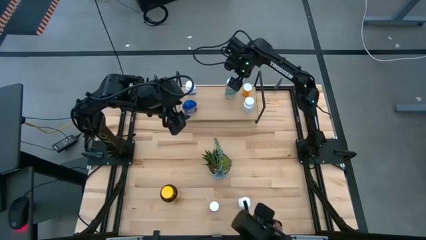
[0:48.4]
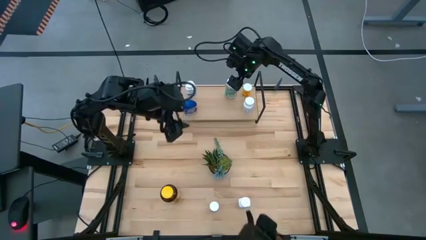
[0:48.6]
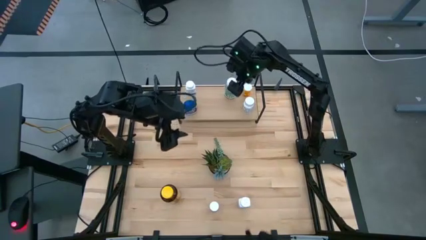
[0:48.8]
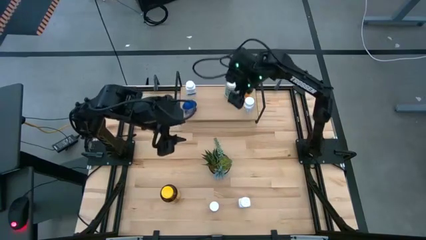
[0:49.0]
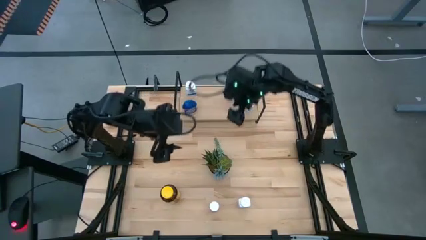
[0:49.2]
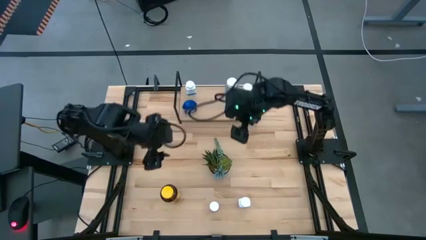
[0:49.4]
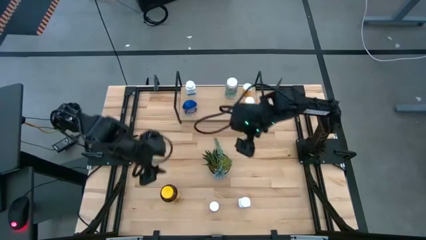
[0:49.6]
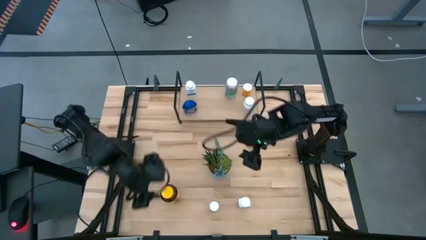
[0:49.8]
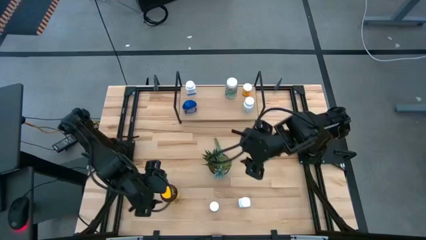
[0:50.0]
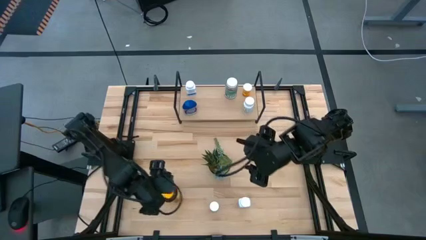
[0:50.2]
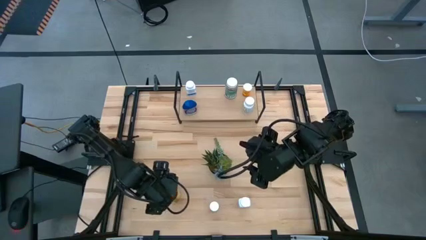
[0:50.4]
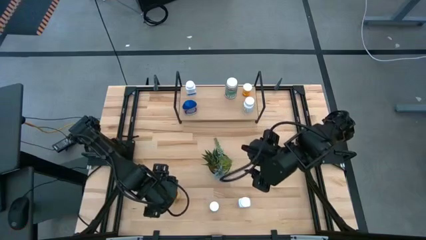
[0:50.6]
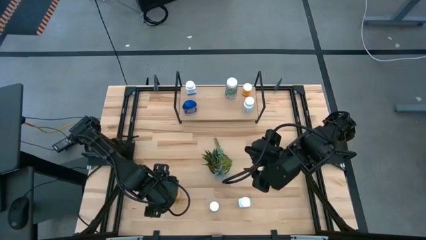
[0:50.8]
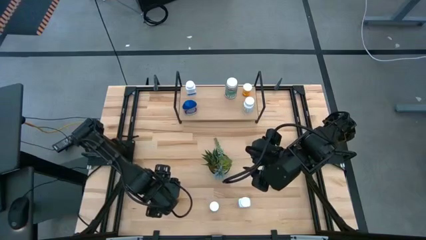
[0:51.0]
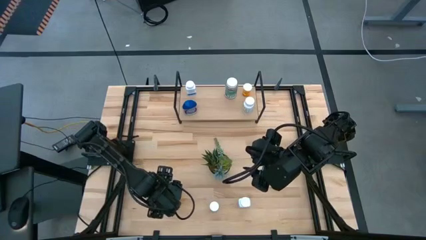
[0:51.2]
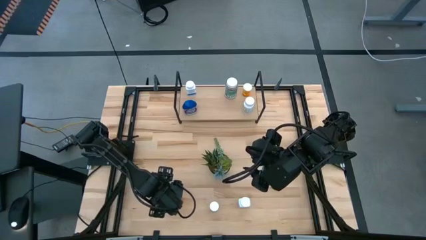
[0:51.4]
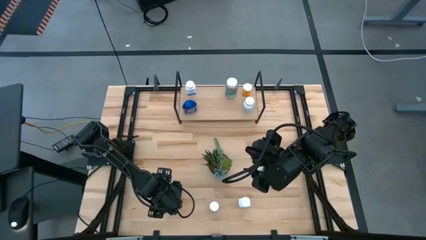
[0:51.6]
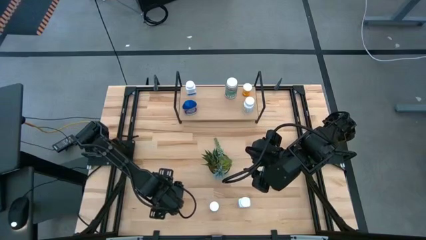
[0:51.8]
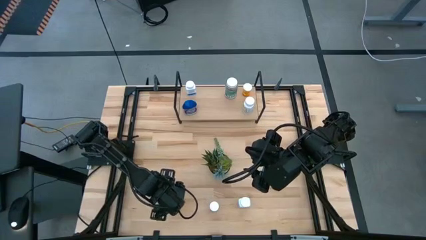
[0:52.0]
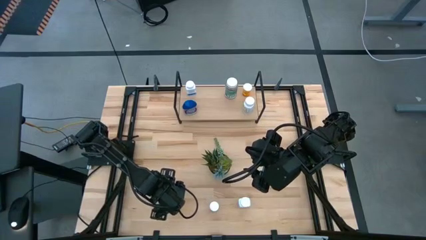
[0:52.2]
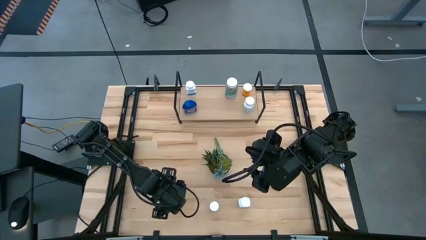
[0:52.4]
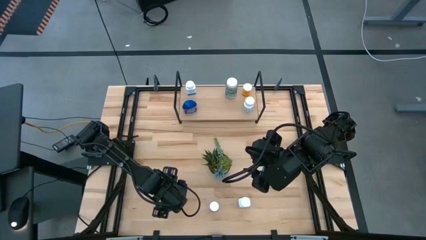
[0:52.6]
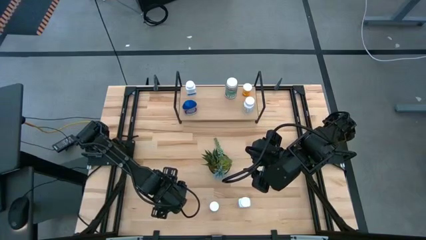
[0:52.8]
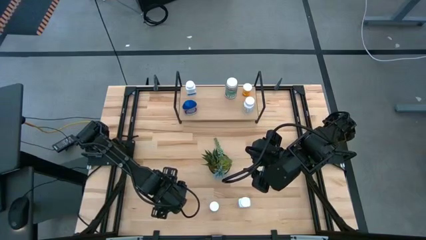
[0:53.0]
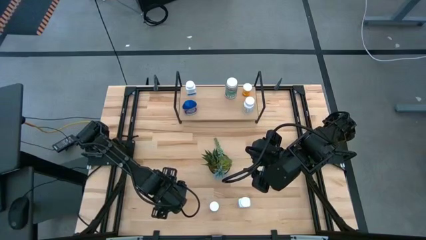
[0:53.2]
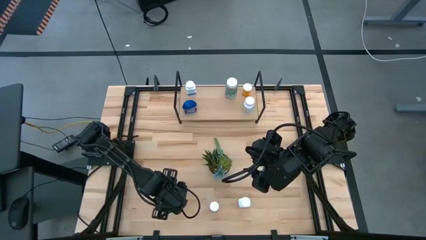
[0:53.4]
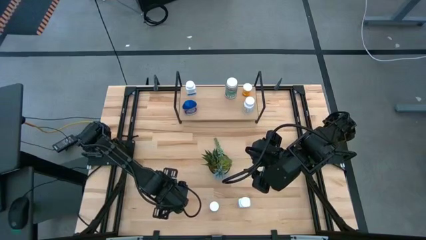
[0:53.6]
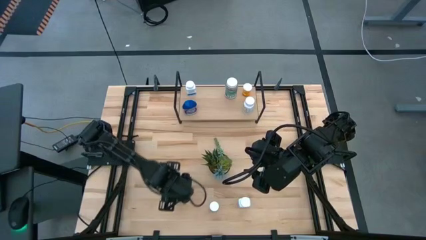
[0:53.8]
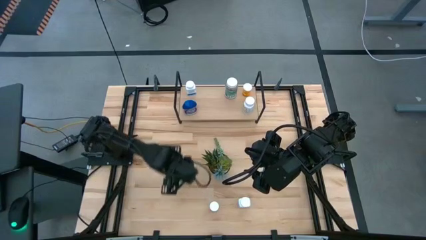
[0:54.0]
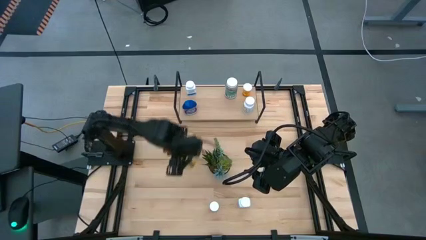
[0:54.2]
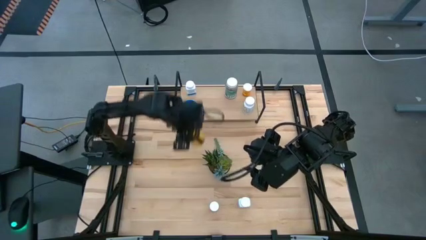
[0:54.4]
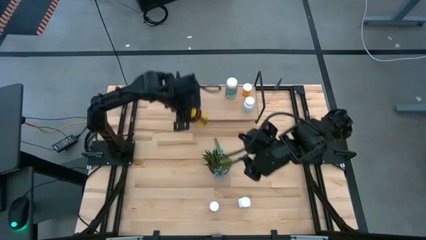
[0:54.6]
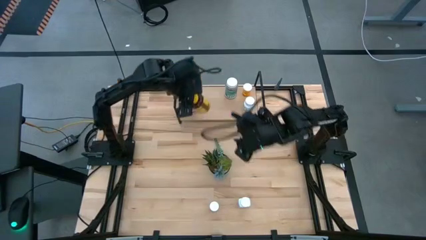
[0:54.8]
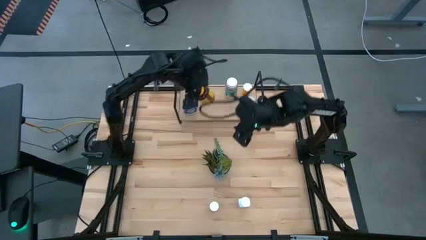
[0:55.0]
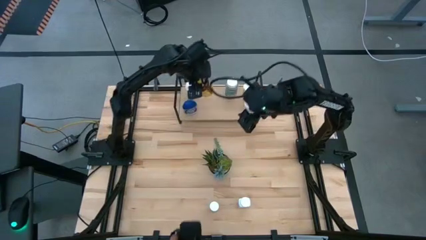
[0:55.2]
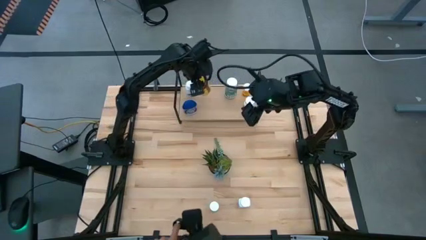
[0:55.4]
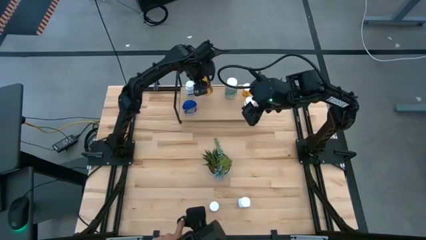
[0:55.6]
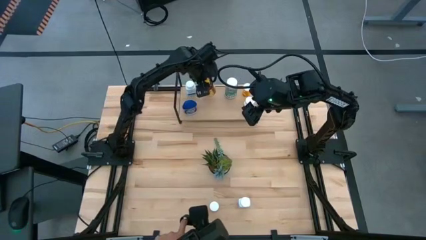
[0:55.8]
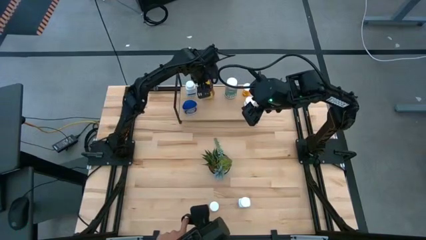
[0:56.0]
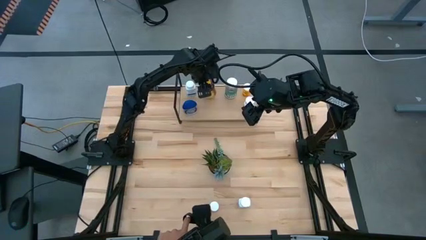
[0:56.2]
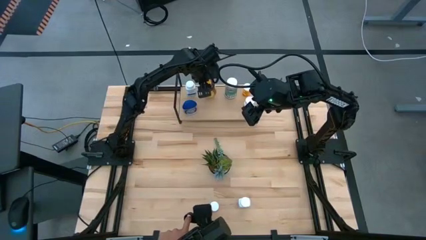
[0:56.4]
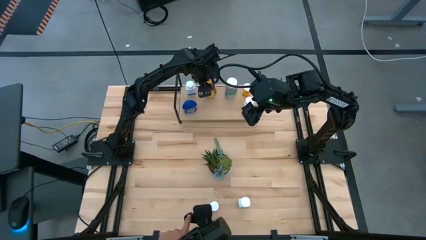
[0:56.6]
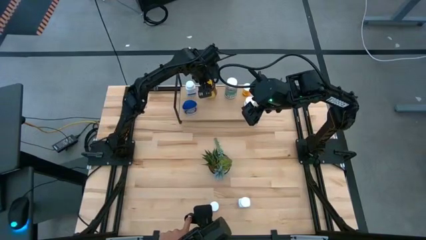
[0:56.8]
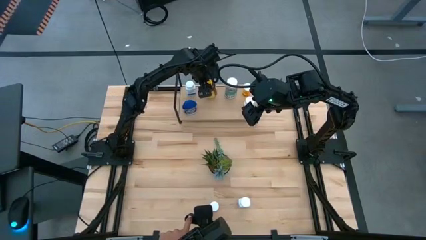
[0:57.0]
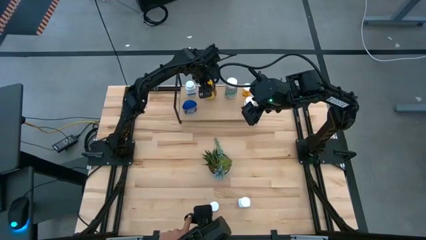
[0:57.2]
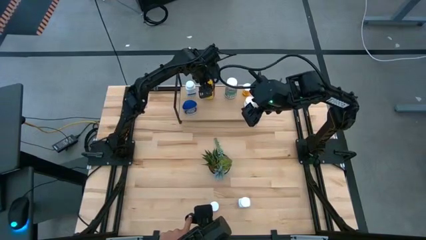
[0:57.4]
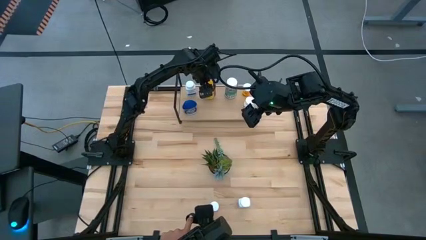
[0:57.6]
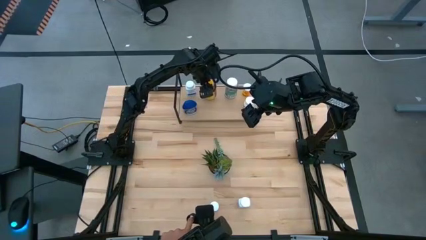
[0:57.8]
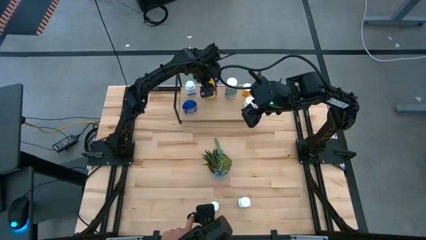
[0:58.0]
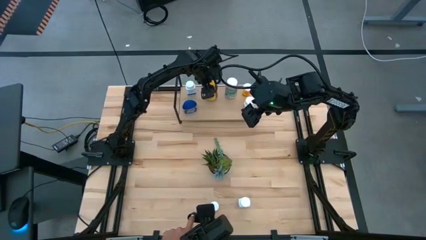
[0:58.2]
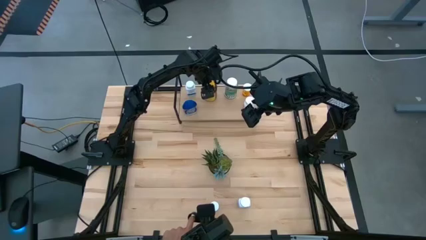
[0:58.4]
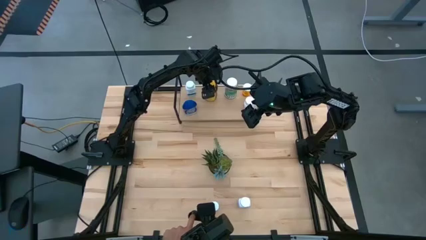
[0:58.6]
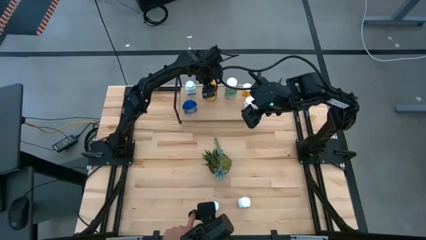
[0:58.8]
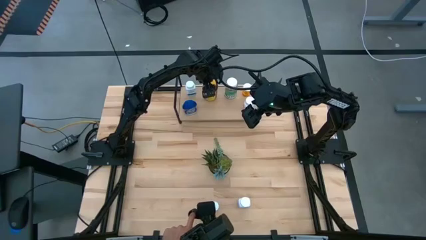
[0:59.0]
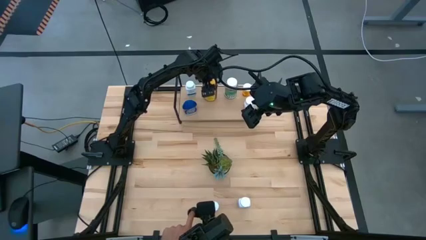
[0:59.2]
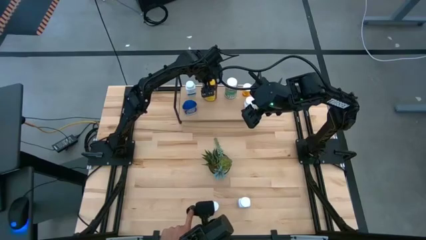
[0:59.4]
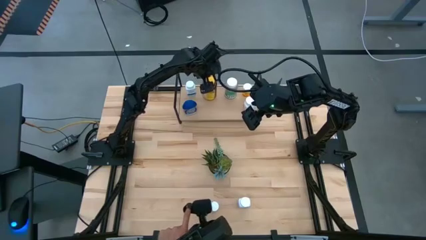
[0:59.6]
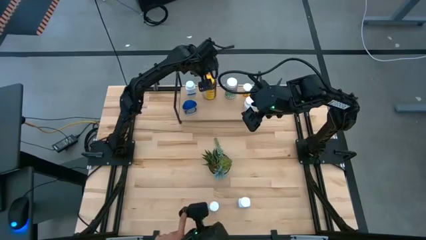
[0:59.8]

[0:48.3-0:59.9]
Task: Pick and place medicine bottles onto shelf by color
Put the yellow pill bottle on the shelf

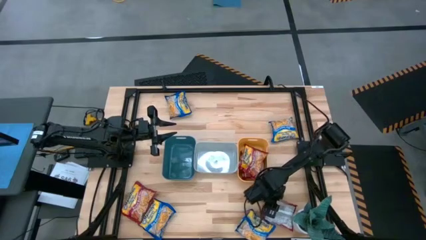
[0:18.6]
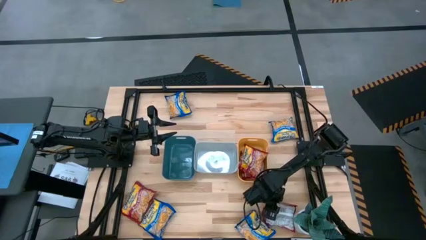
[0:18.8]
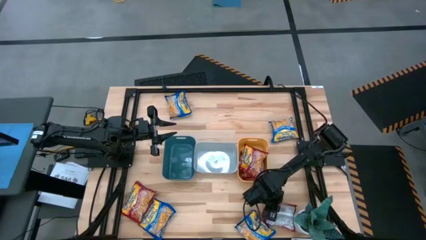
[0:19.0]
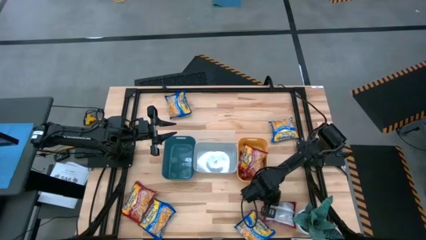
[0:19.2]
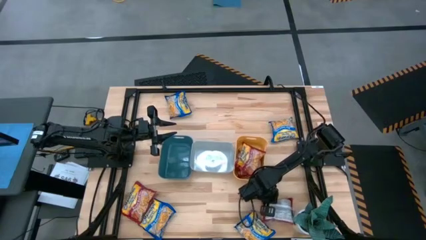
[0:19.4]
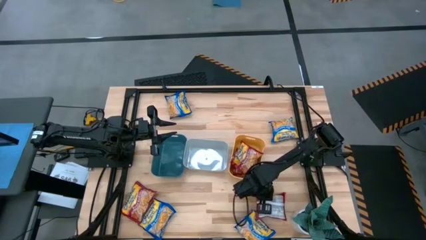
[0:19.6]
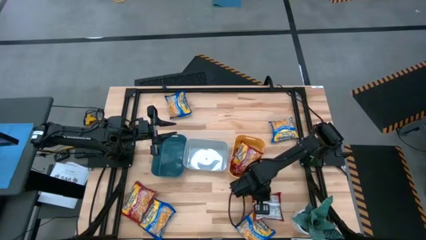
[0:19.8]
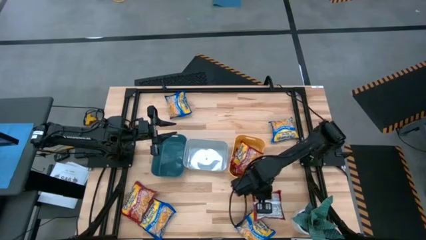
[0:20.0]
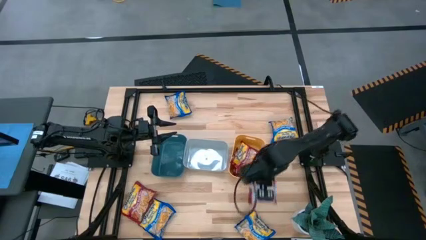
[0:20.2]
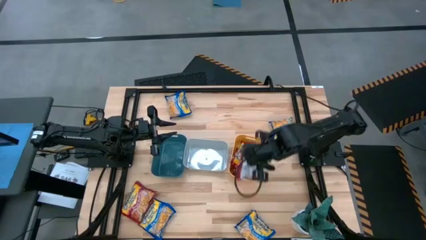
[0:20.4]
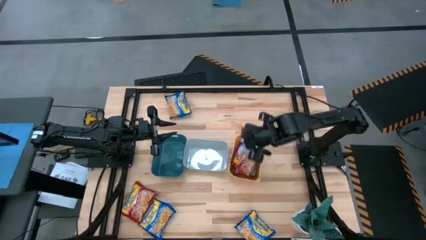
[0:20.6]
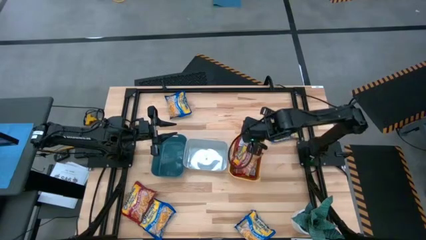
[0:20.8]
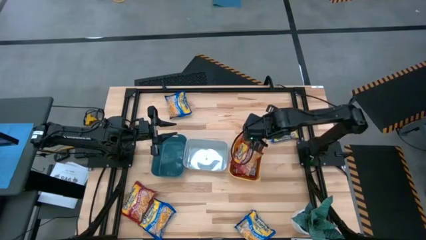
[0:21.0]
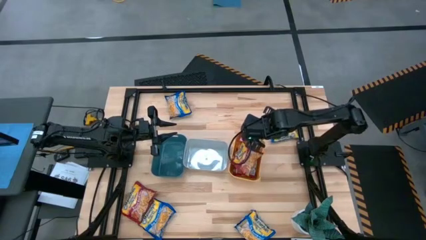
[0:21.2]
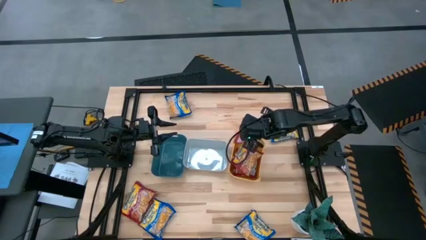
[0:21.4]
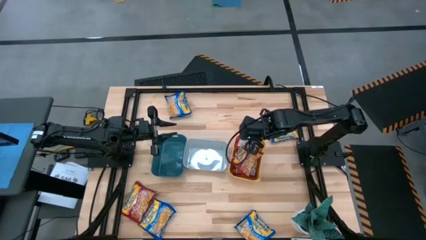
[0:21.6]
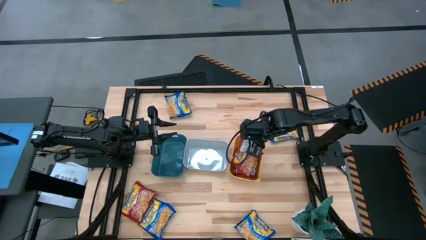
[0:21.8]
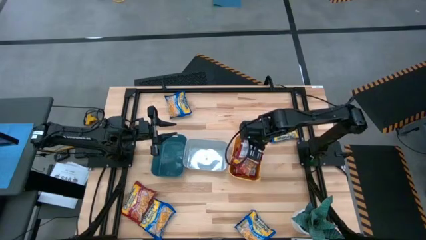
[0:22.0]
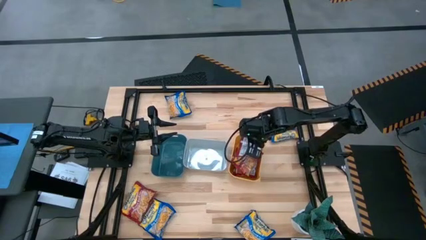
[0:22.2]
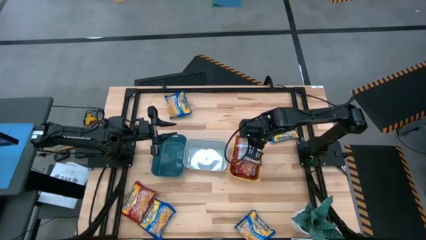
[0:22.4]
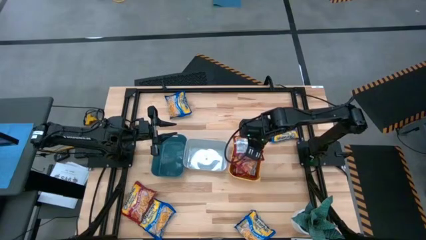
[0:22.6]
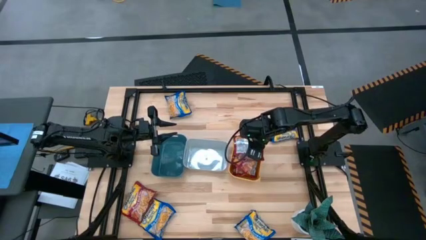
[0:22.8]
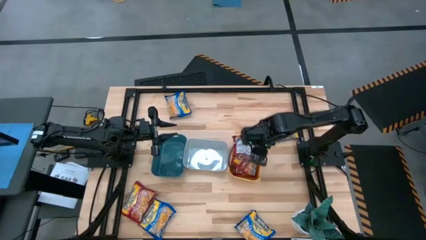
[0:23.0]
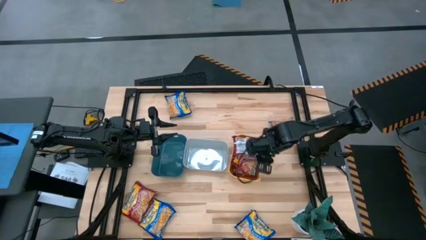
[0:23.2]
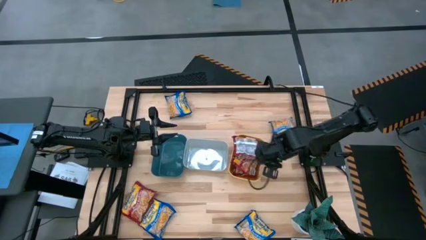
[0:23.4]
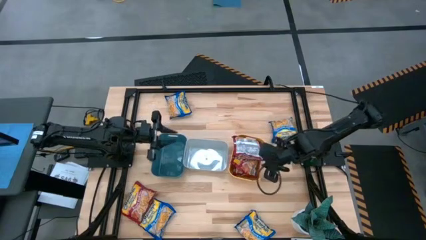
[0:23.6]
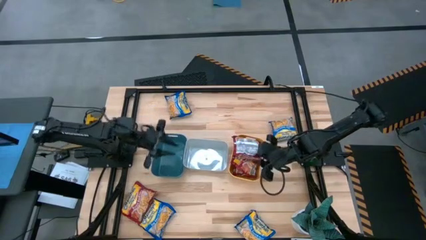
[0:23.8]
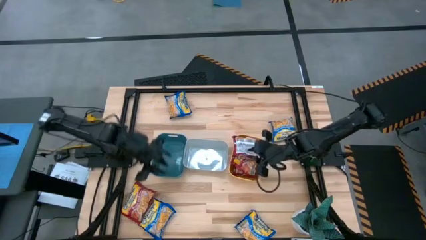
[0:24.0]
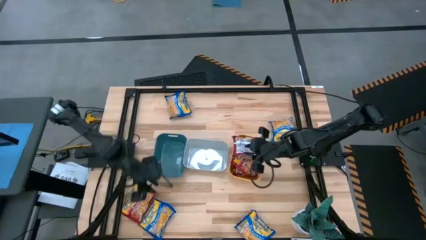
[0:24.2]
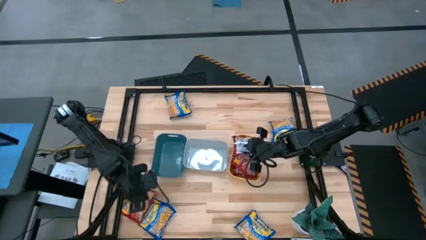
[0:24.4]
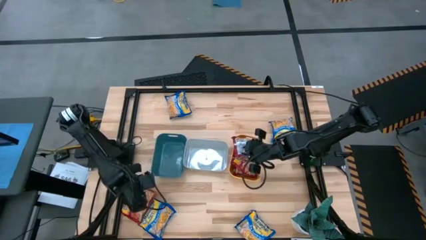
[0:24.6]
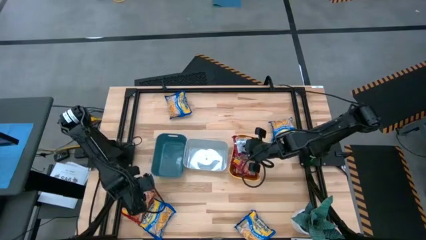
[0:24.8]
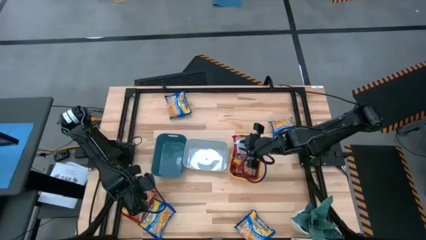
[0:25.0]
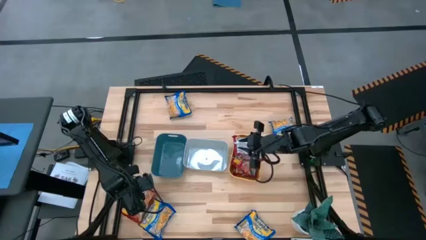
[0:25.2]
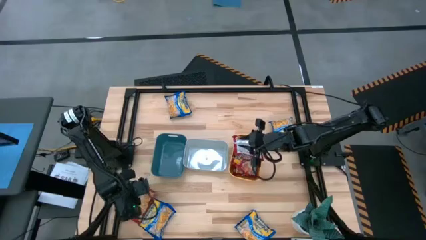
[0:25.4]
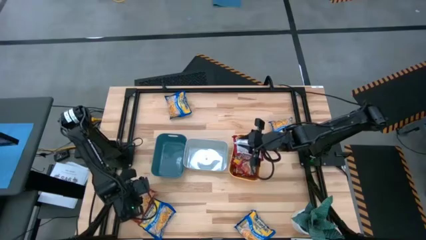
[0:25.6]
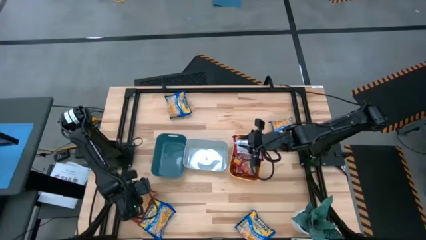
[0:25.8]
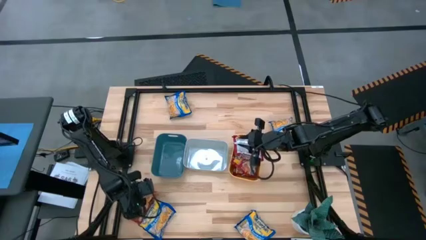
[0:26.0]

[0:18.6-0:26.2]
Task: Sort Maruchan noodles
Put the right red noodle pack into the yellow bin
